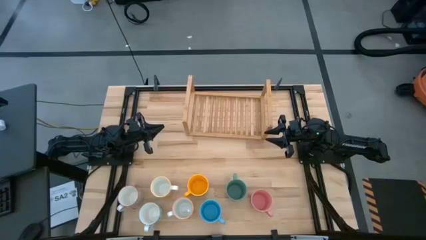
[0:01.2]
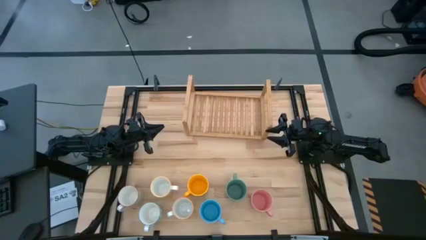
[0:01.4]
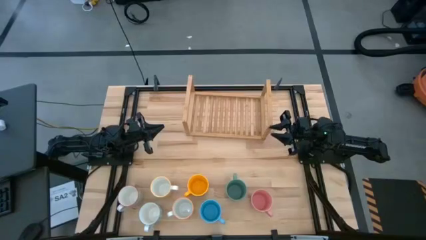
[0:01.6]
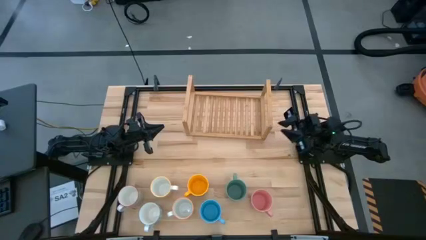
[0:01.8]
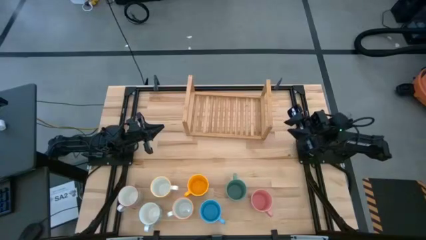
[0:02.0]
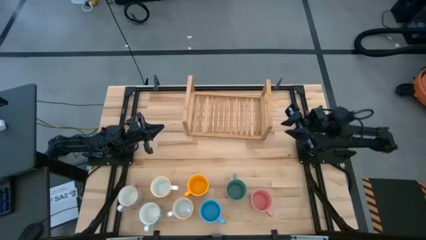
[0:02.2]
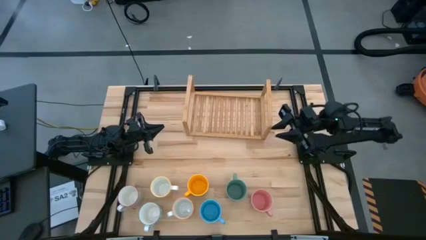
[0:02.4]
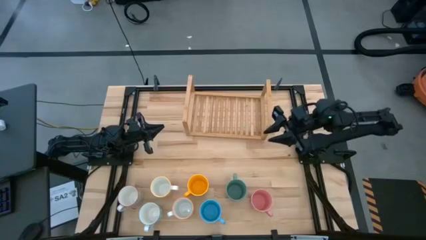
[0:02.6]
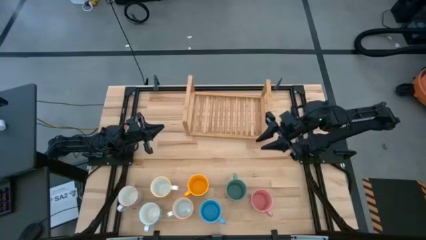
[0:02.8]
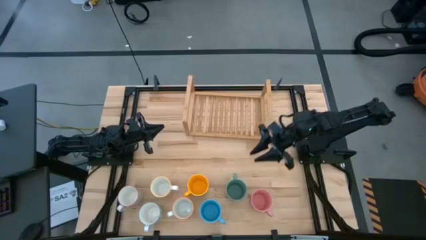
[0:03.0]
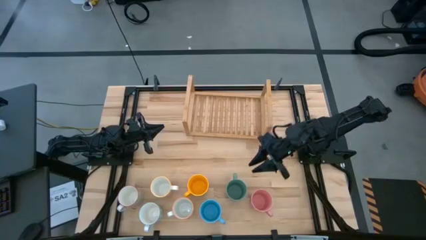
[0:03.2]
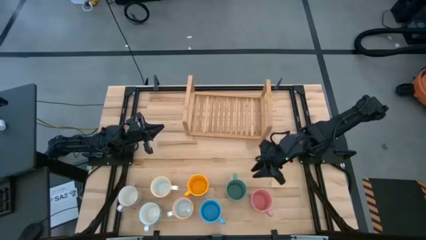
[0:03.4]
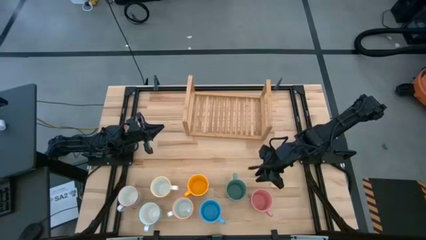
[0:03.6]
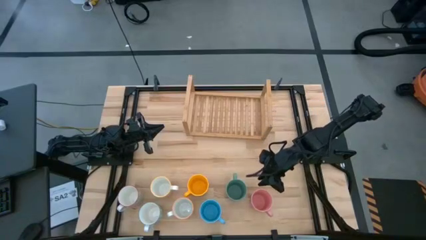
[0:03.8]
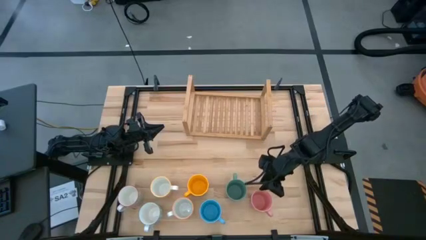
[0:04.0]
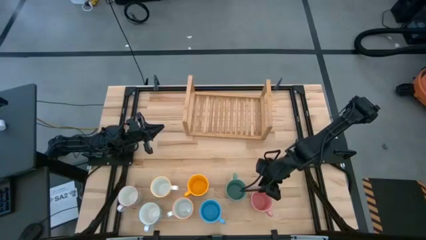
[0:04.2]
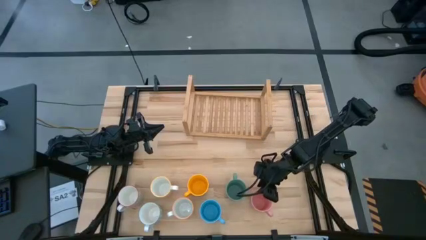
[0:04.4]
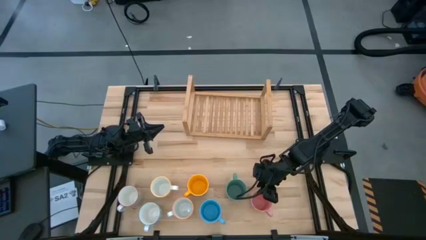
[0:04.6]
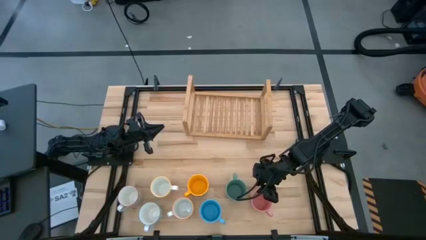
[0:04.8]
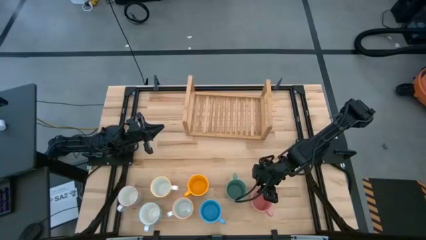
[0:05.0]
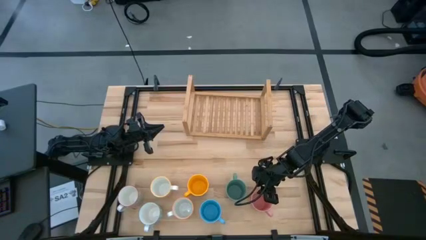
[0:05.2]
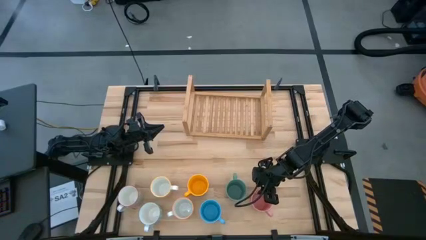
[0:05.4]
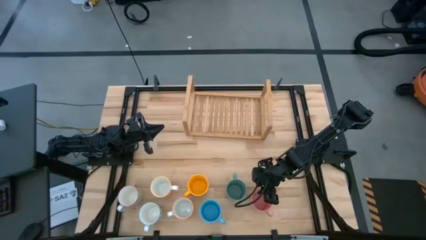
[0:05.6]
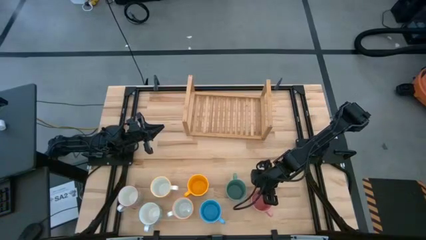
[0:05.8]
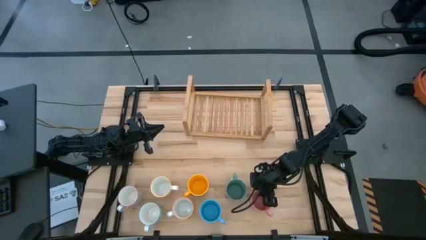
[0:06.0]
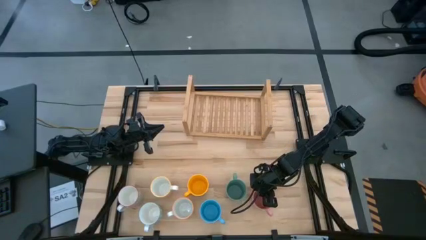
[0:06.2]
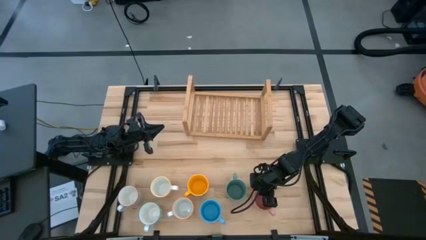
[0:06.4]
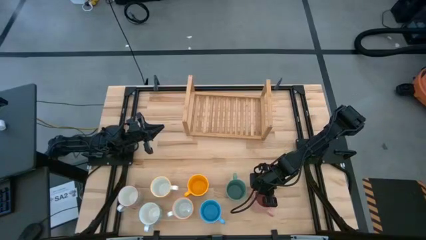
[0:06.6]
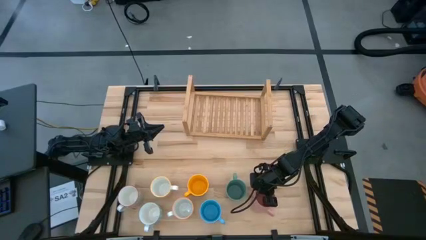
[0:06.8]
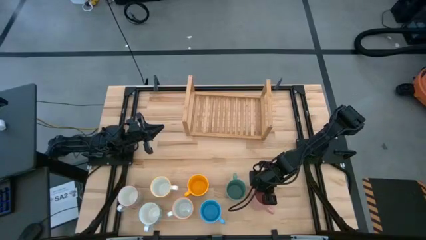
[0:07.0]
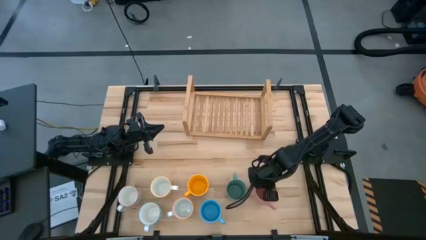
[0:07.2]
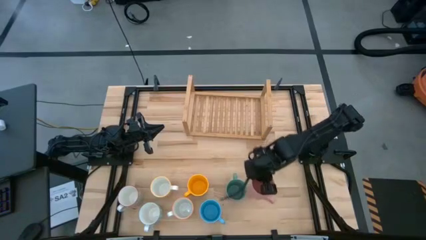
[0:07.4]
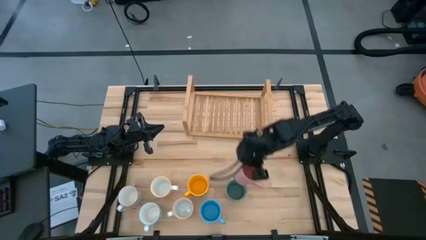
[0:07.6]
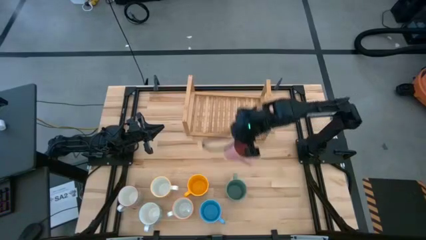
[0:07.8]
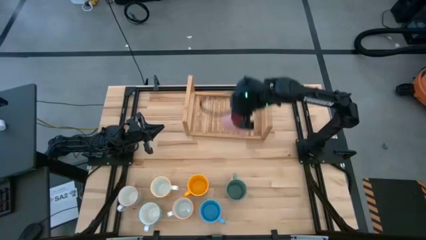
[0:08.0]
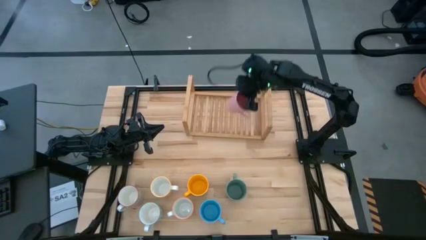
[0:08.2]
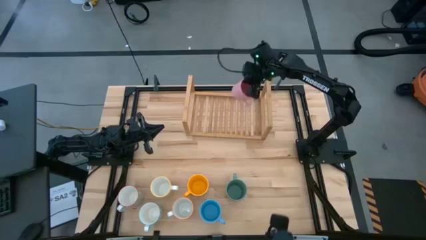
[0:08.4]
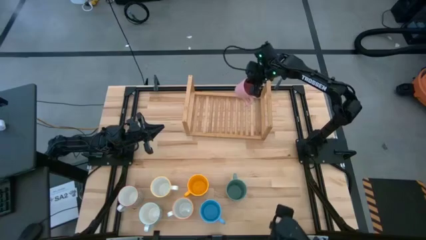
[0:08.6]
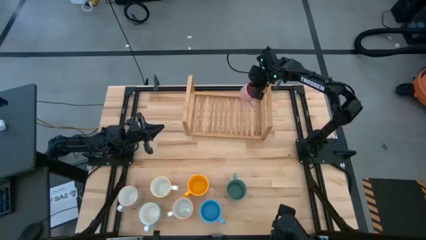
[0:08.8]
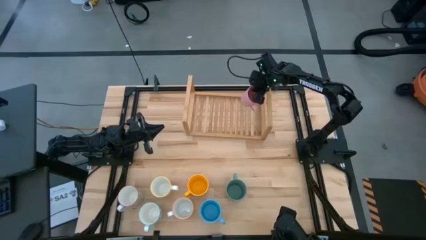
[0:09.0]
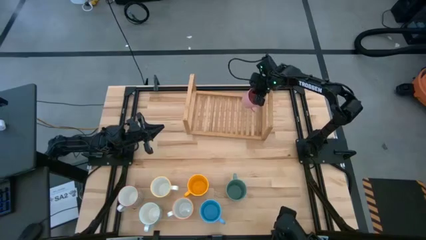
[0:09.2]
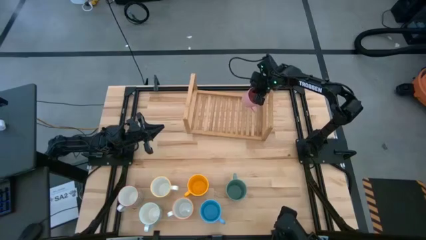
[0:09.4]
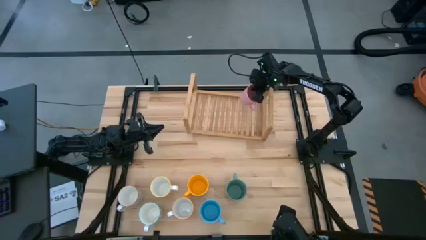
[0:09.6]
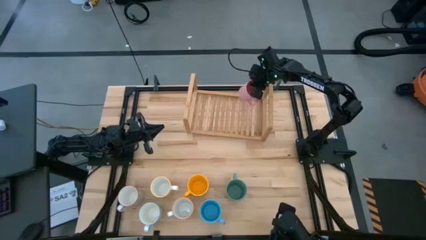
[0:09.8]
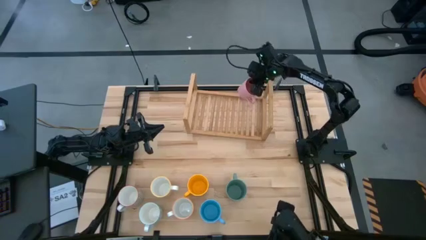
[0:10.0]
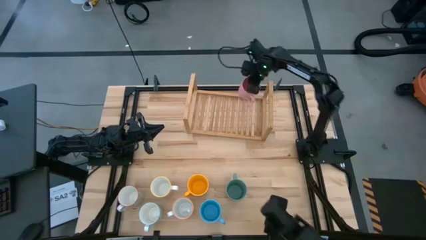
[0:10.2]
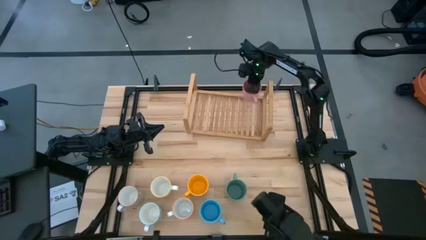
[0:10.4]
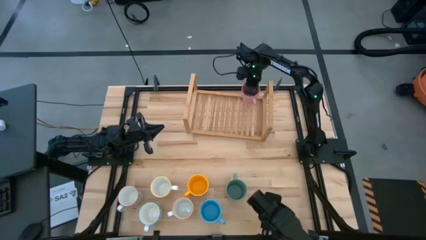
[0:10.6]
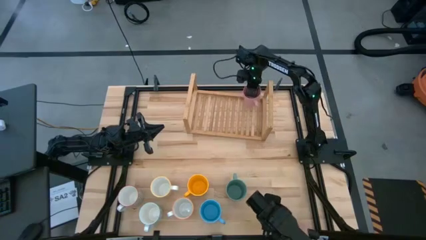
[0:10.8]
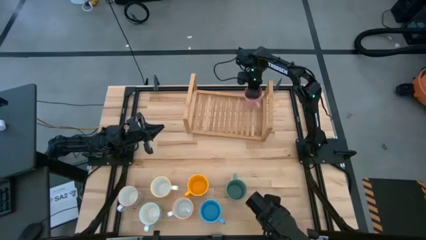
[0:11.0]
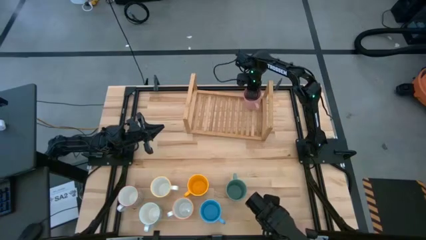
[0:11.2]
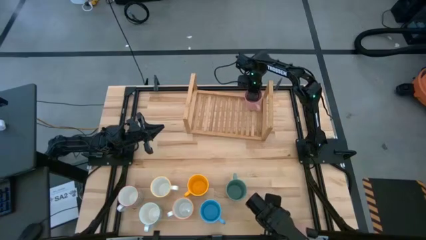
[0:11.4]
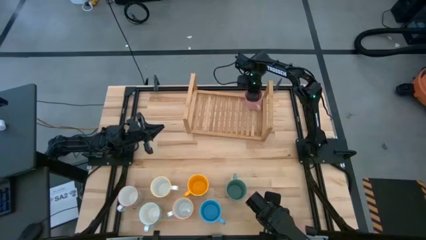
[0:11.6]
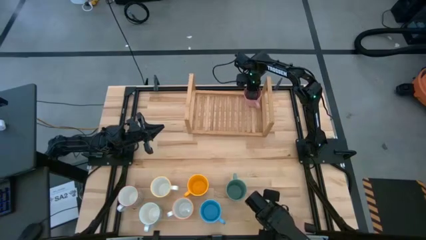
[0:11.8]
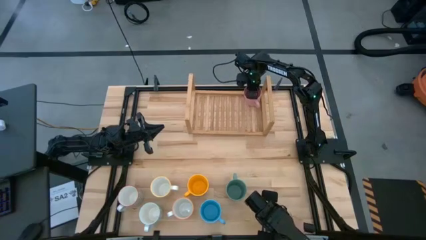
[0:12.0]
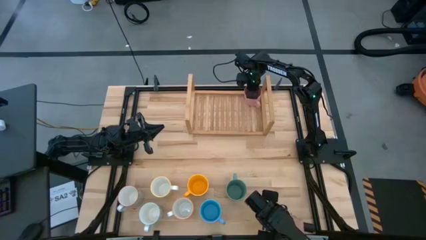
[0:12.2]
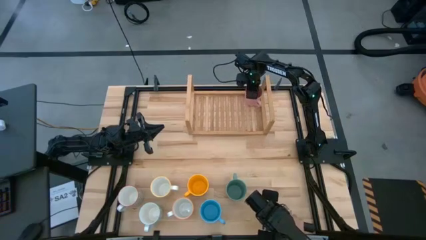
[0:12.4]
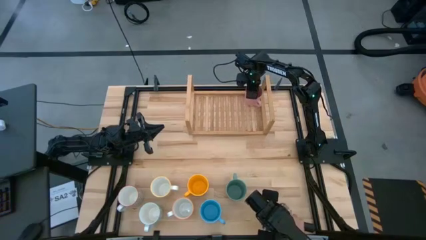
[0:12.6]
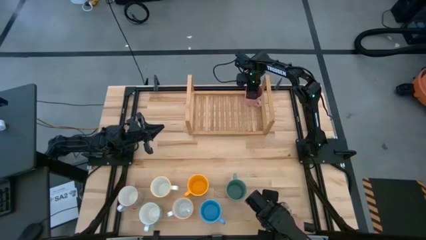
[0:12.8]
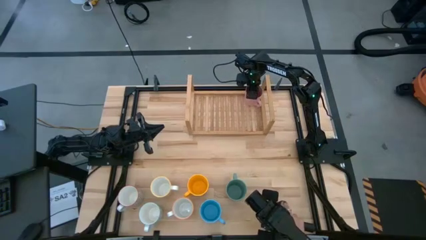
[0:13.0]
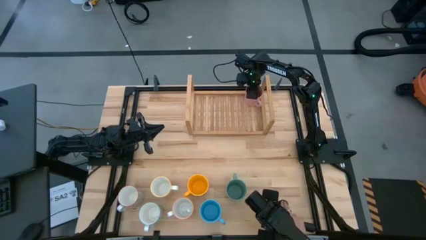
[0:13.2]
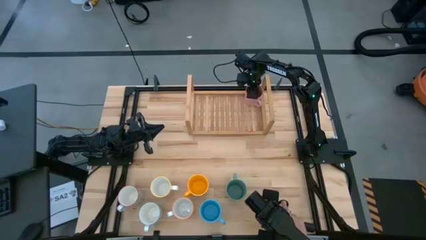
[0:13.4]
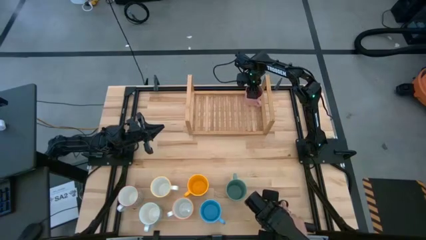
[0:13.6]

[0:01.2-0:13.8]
Task: Place coffee mugs
Put the pink mug on the shelf
